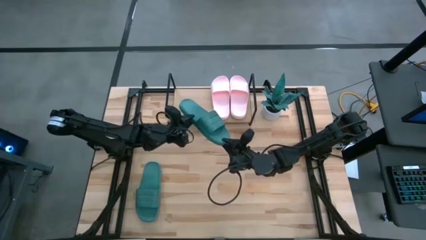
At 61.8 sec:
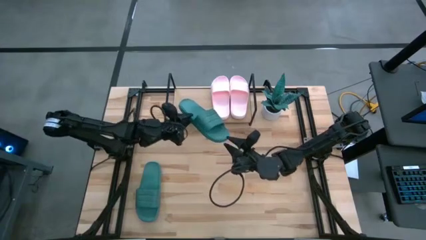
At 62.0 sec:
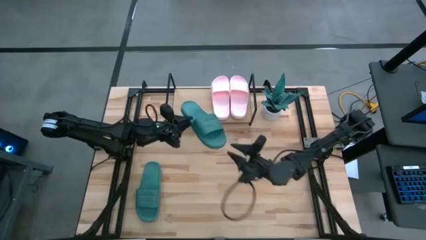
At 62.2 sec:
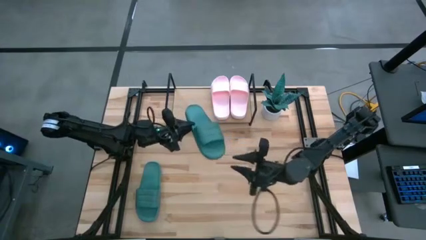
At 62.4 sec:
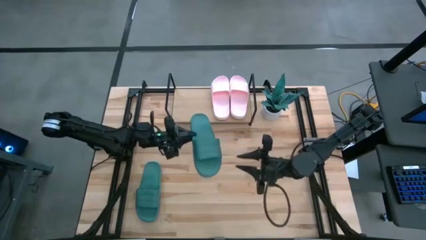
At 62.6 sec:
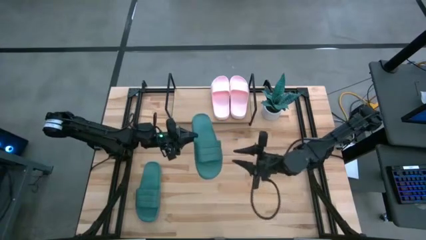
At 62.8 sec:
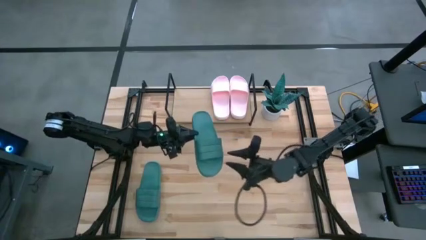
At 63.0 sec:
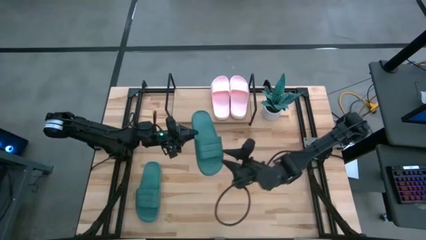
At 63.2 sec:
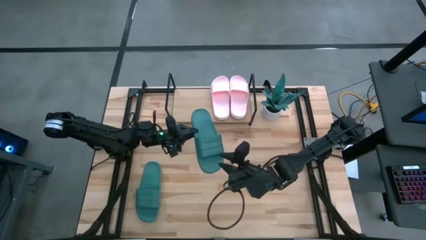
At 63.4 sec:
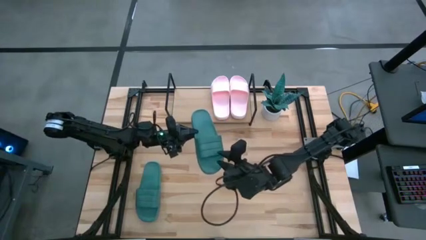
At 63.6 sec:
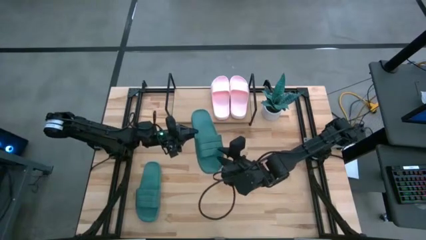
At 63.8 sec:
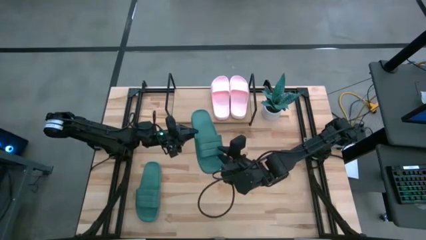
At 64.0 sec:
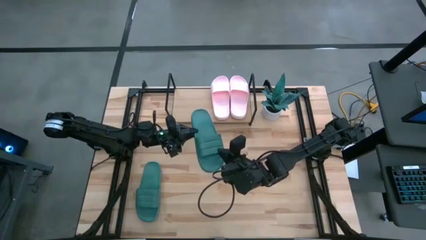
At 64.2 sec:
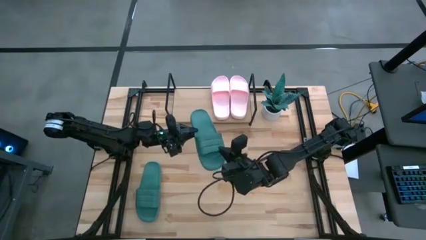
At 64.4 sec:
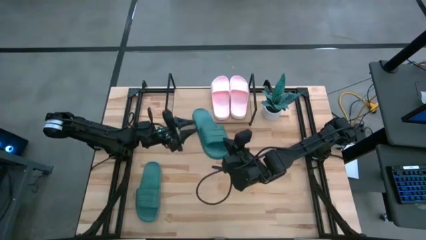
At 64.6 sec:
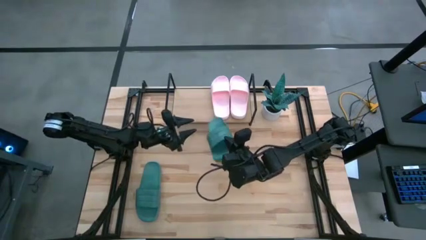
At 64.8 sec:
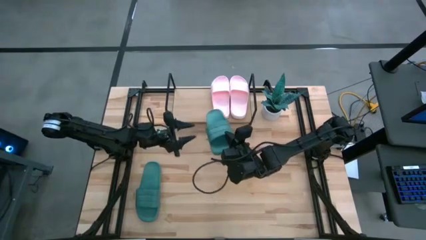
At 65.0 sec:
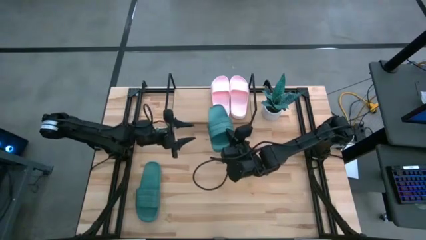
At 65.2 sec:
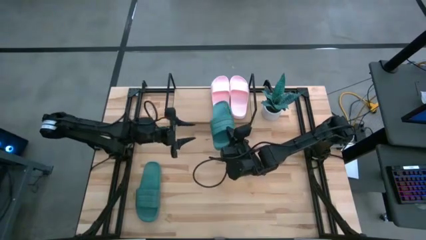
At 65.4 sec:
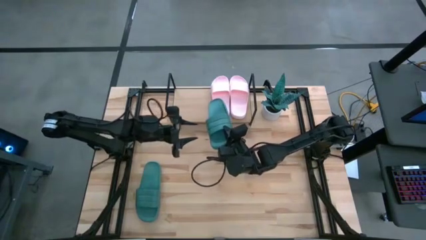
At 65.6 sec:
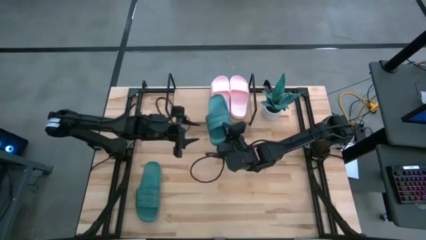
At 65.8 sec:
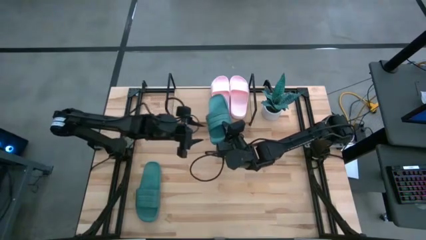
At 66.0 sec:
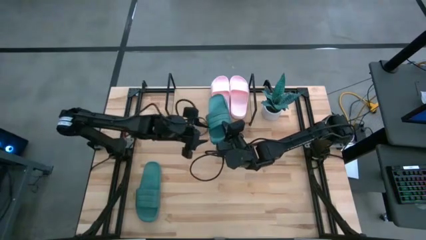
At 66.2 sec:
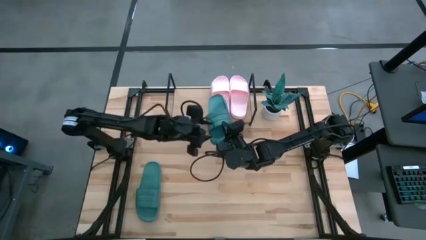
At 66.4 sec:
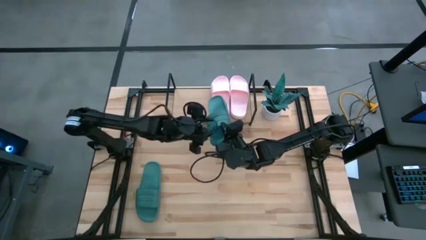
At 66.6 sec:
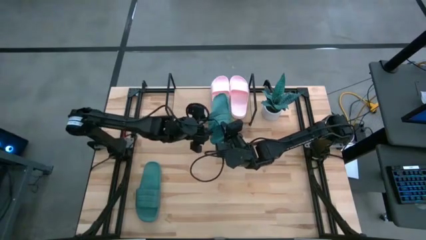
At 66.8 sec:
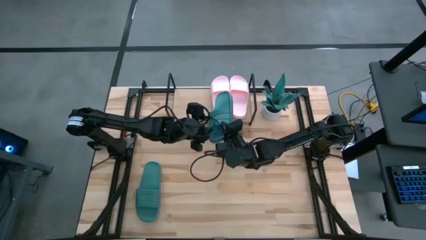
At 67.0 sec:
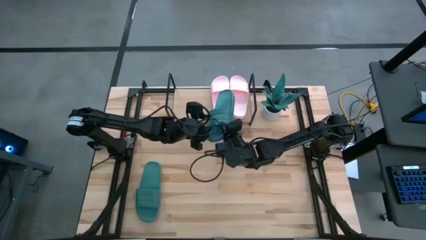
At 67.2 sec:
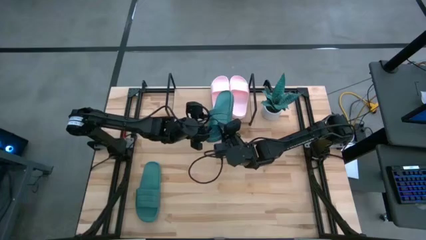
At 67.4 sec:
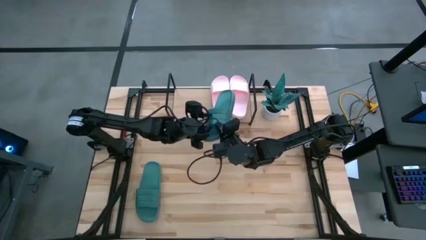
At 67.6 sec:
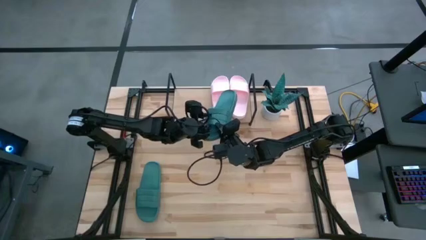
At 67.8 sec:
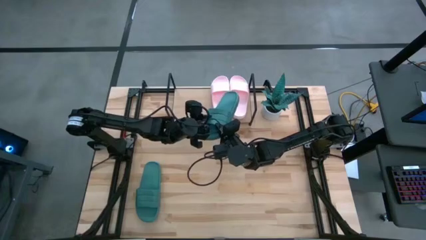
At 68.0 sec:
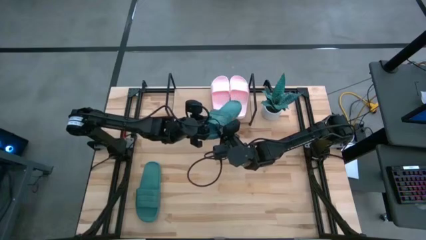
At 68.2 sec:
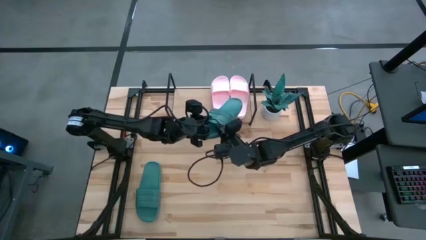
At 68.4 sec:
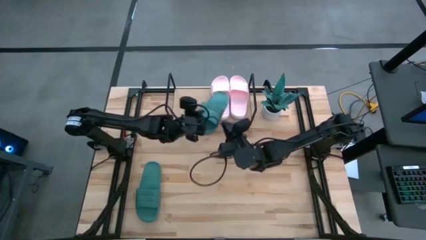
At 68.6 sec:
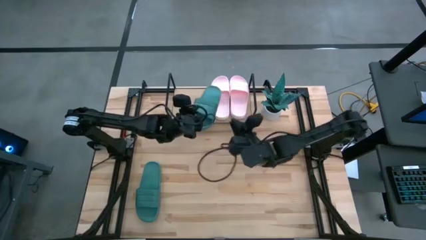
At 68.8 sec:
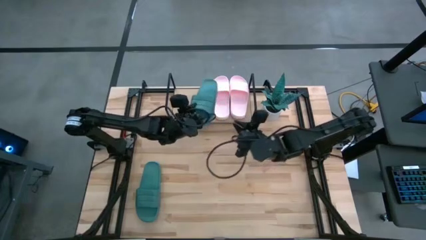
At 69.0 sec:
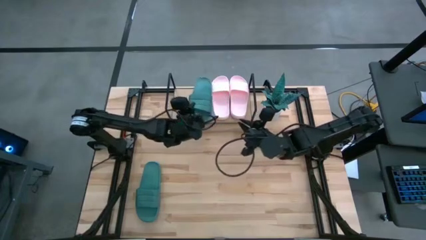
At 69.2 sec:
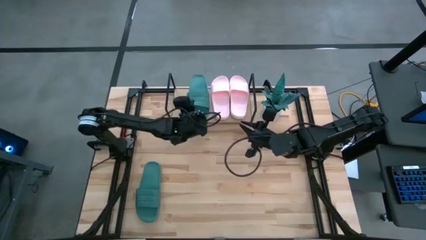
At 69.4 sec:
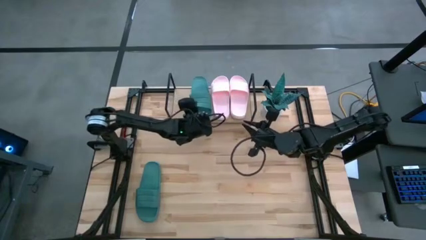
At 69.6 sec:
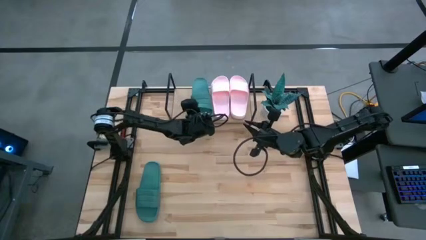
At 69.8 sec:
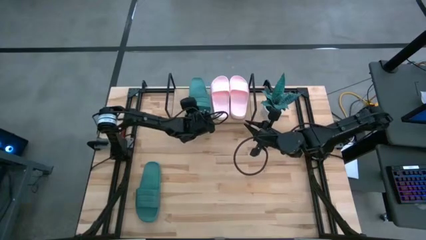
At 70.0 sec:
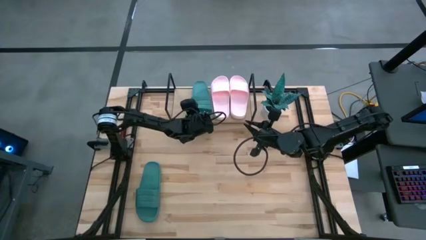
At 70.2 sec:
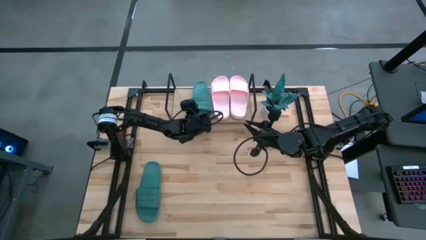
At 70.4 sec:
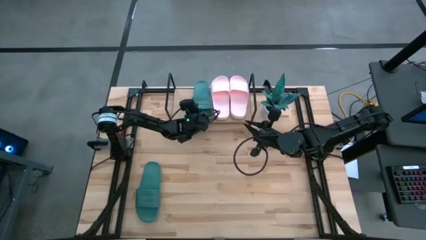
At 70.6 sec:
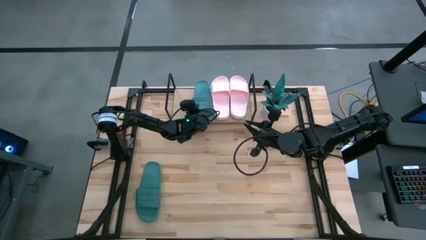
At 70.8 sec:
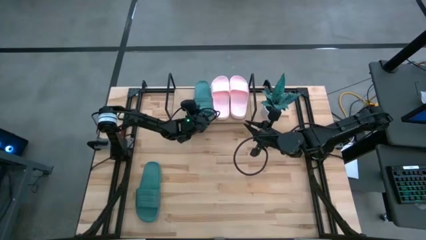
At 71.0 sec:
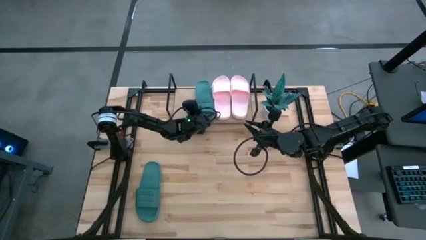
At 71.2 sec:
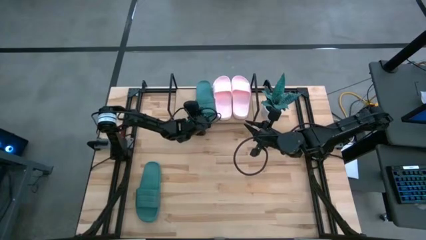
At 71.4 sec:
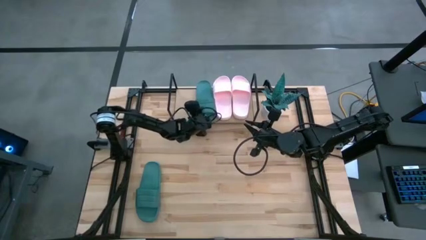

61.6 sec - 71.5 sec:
Task: Pick and place slides into the shelf
Put the top green slipper on the shelf

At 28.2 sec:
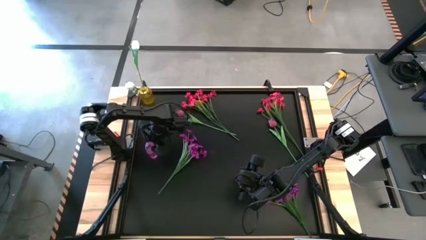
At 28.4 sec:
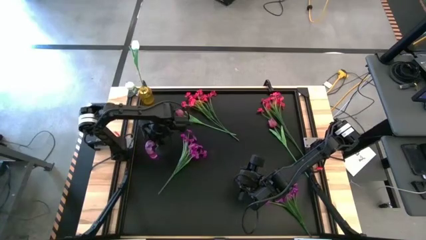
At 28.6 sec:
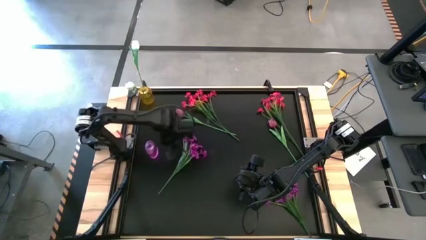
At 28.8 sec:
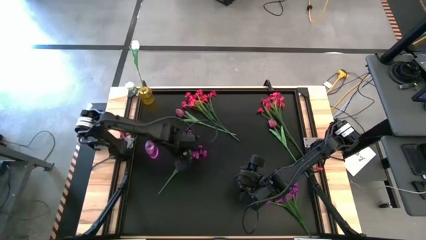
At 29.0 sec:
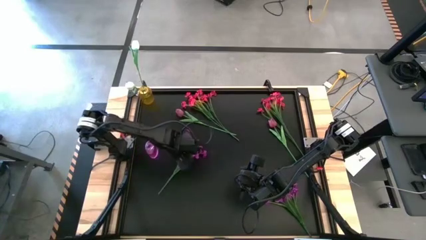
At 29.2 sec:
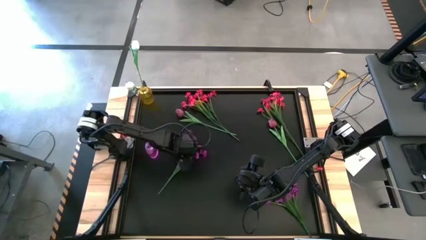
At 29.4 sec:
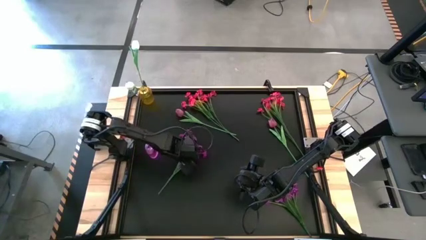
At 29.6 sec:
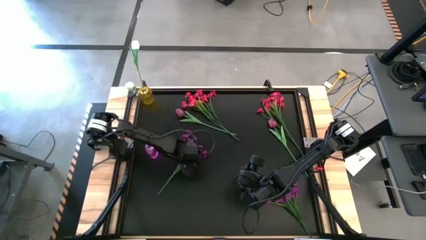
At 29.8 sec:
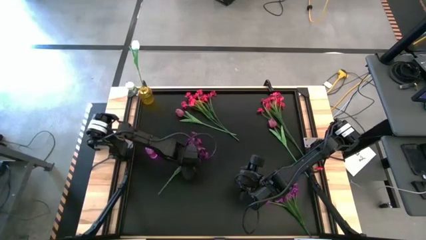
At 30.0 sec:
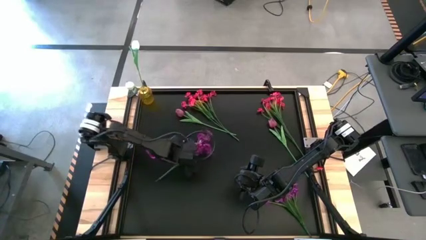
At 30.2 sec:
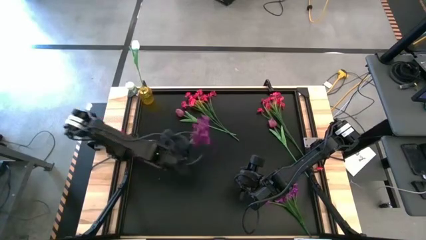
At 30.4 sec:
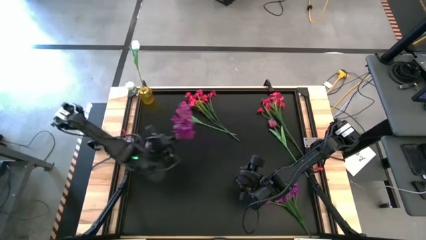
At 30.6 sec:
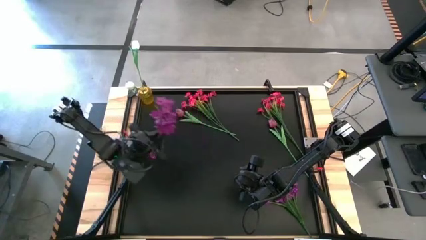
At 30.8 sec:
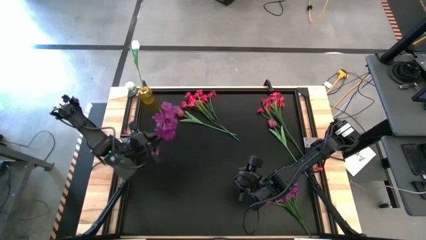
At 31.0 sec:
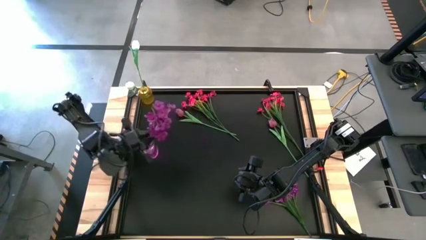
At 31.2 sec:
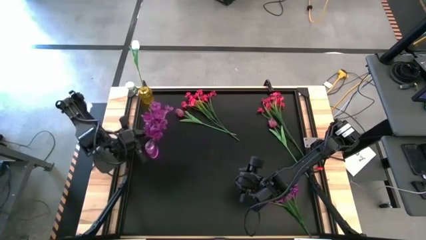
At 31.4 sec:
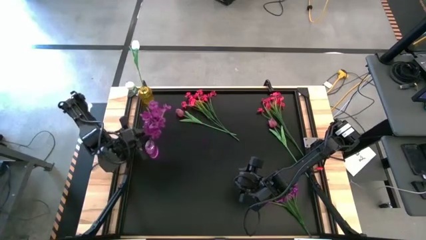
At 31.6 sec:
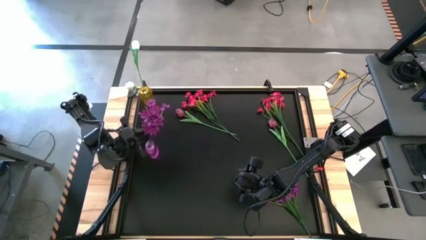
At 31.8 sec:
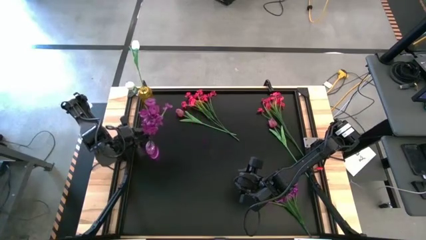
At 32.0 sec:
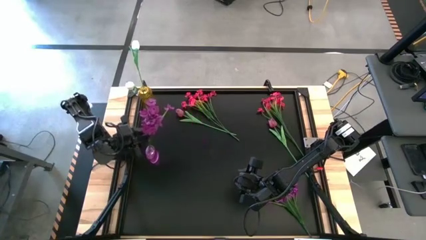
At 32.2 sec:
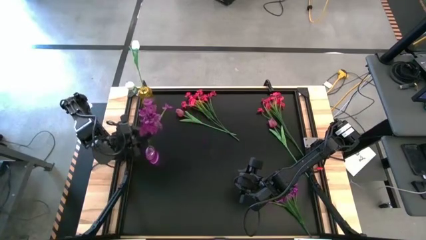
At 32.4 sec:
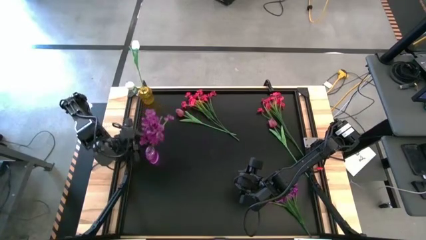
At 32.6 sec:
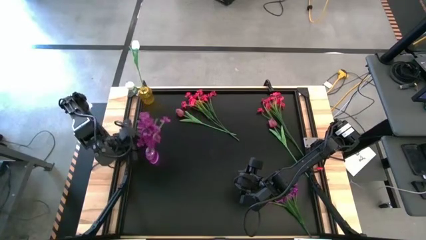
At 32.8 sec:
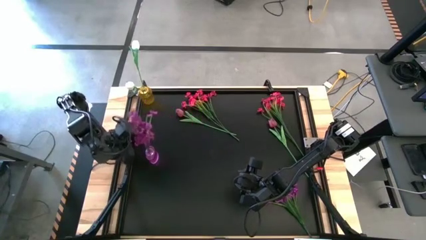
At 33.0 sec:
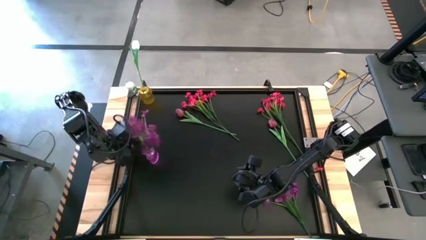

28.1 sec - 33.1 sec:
Task: Sort flowers into vase by color
Put the left purple flowers into the purple vase
